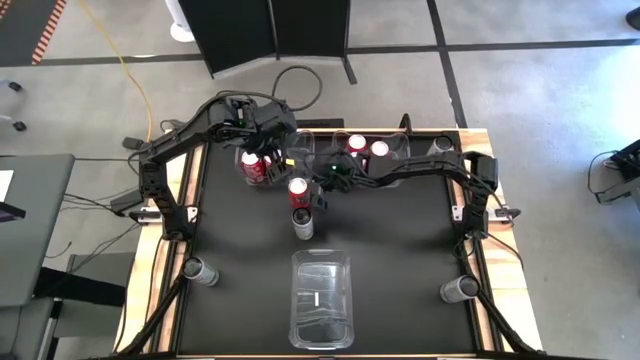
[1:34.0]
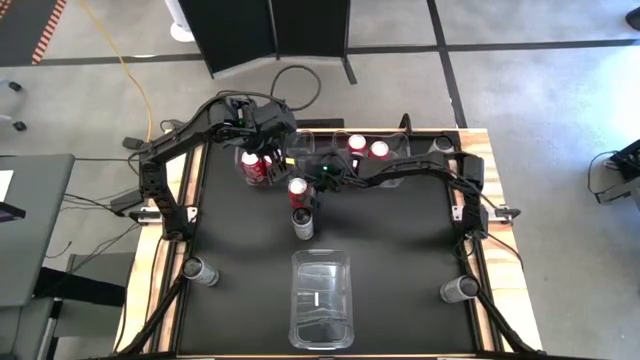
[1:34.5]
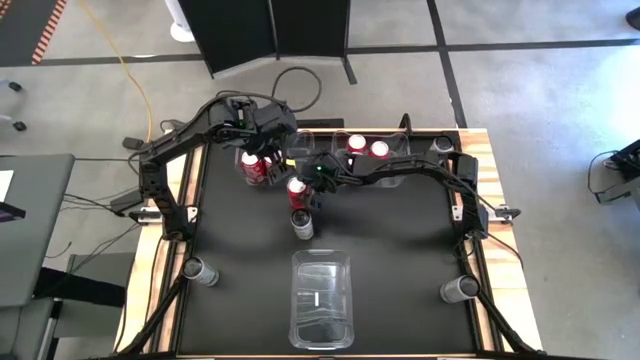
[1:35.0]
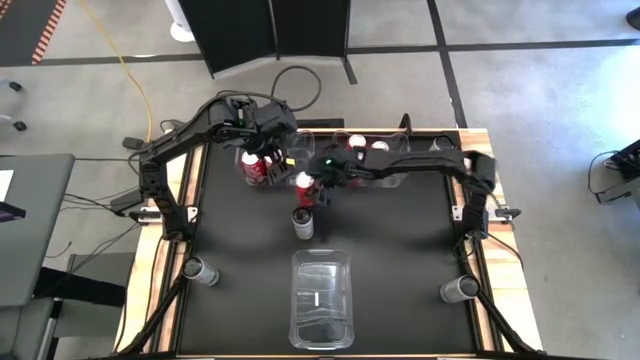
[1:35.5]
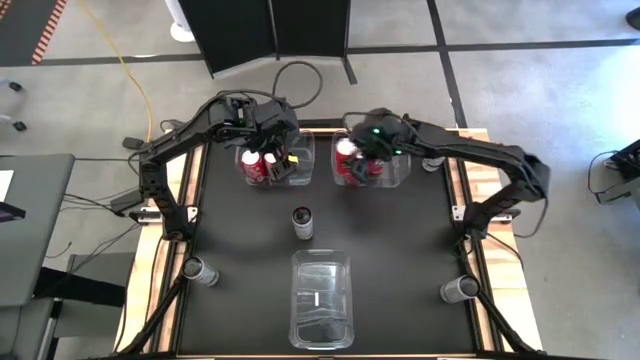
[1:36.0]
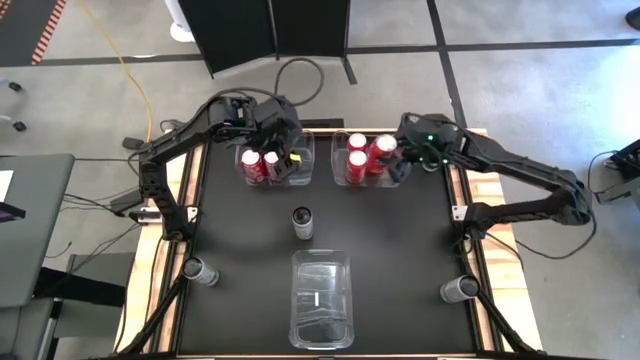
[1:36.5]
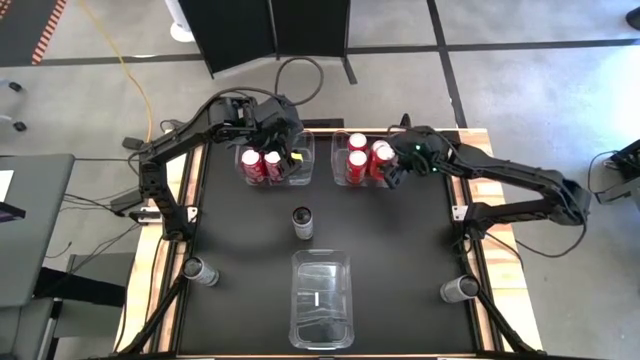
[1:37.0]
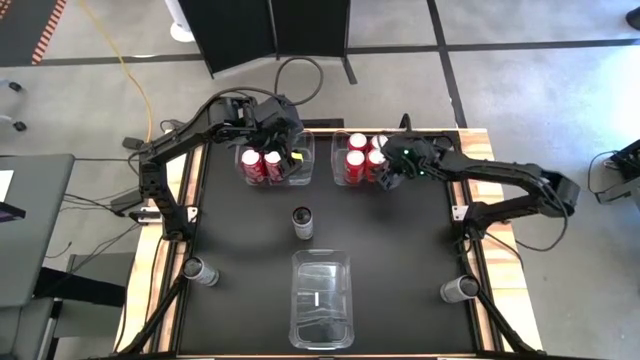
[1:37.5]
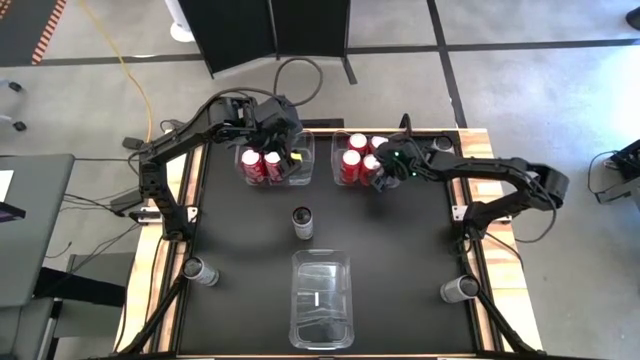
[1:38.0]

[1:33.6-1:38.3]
Task: Sort soda cans
Put the orange soda can into the right transparent bin

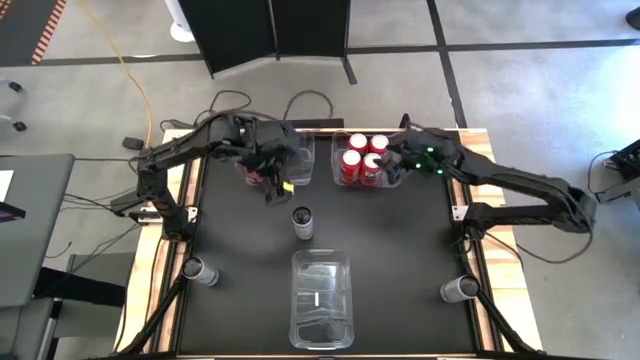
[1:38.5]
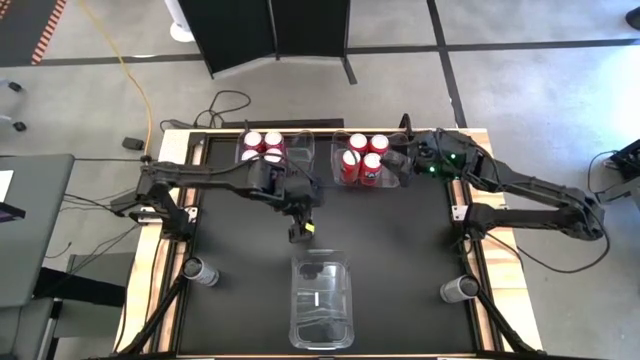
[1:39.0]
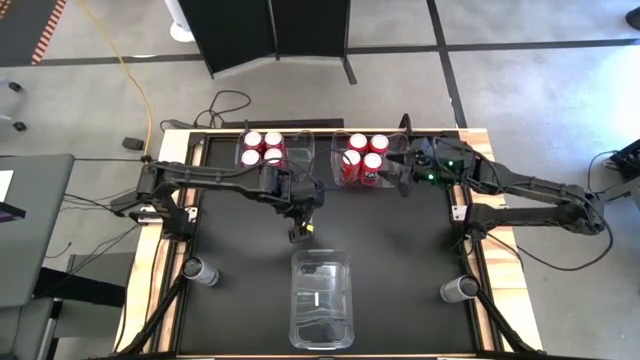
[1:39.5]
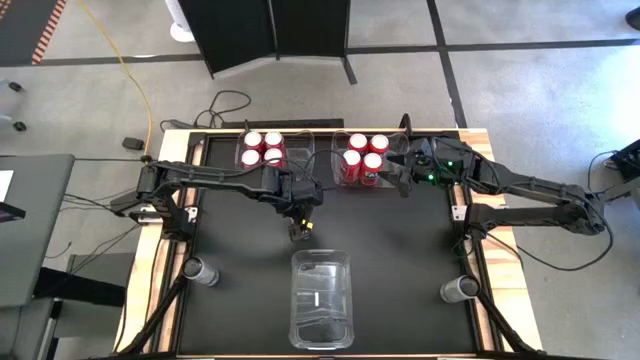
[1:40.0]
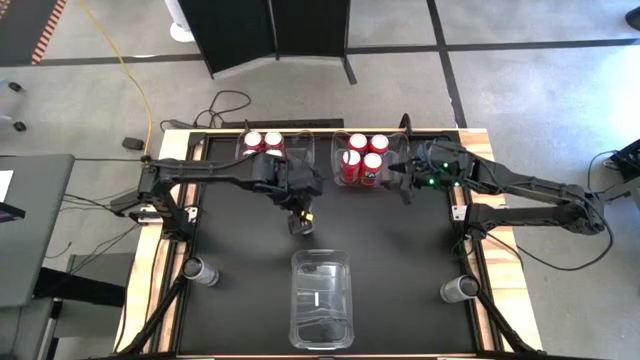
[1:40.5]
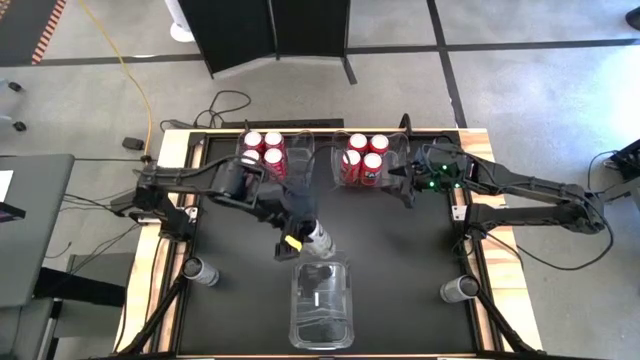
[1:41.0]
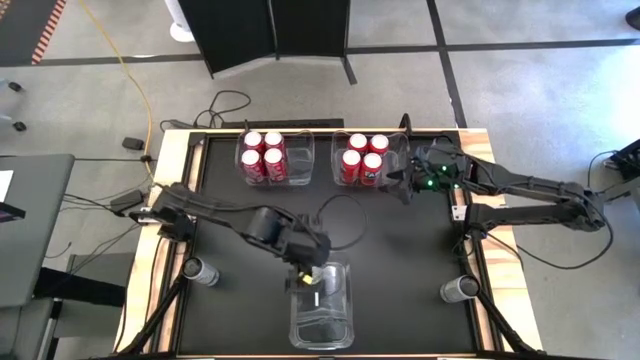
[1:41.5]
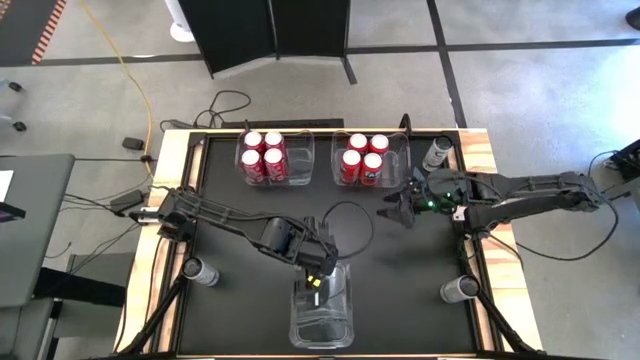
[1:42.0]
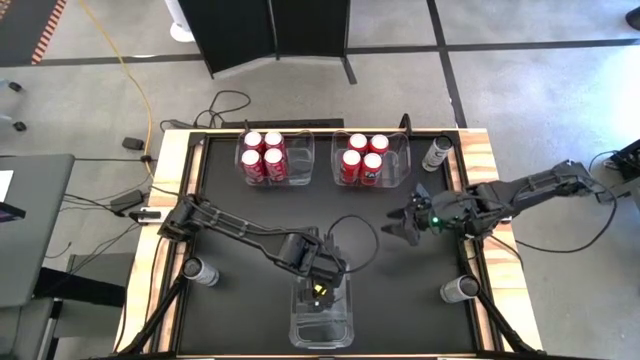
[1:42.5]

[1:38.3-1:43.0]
Put the white yellow soda can into the bottom transparent bin

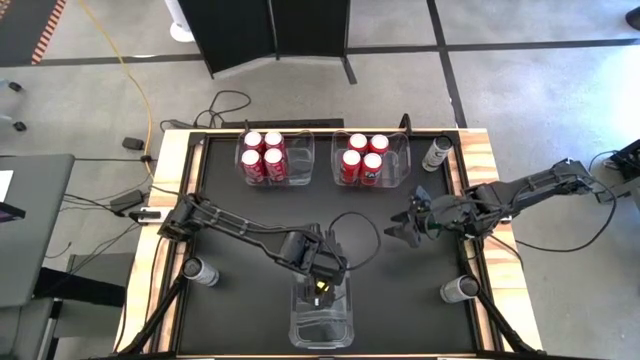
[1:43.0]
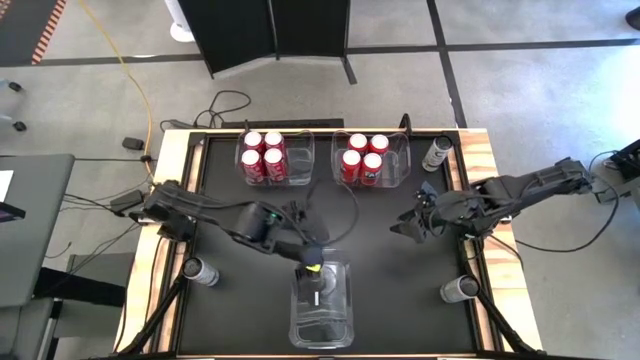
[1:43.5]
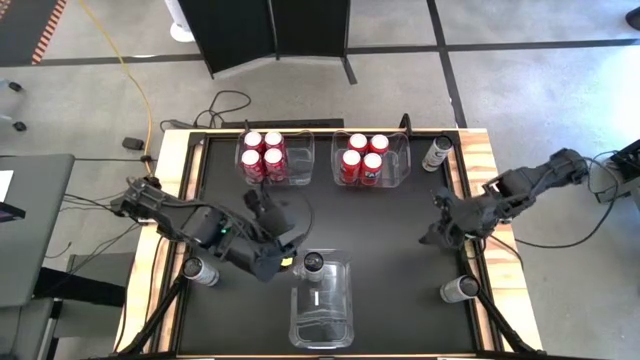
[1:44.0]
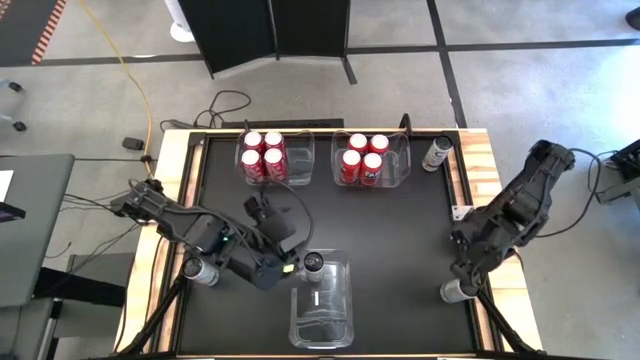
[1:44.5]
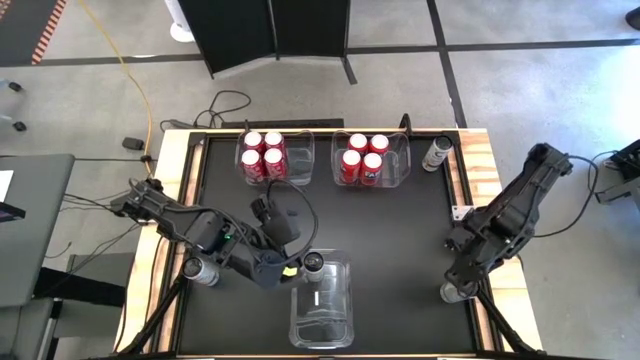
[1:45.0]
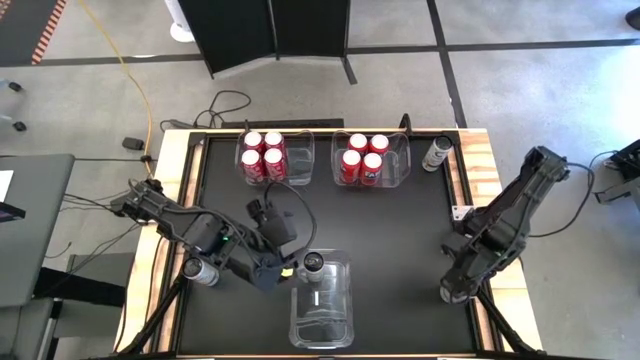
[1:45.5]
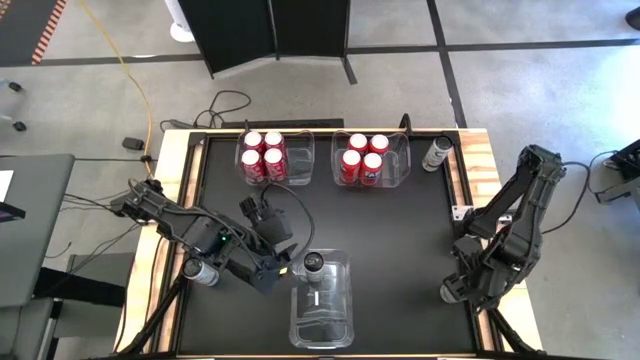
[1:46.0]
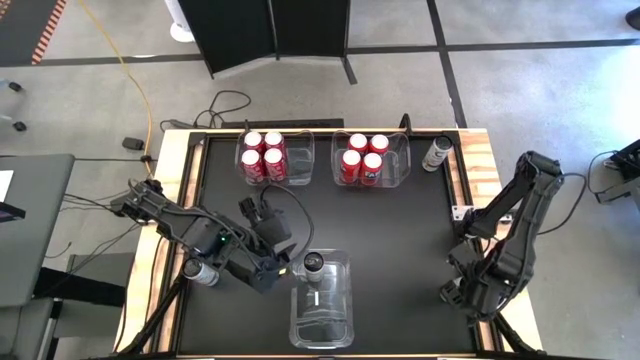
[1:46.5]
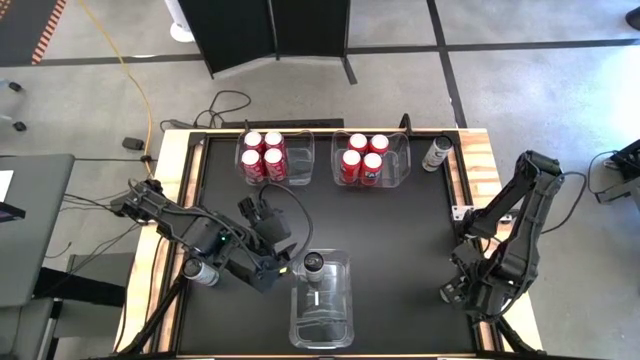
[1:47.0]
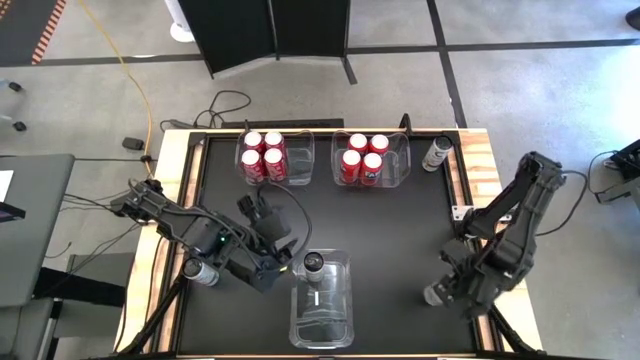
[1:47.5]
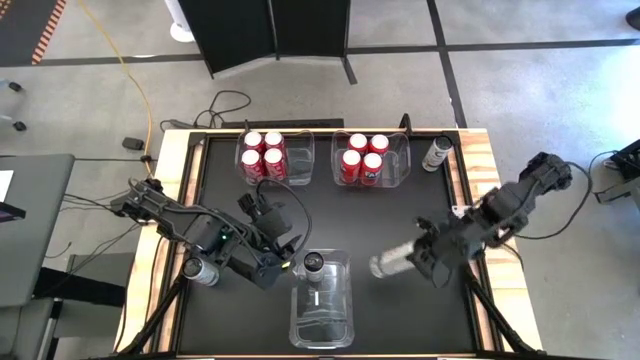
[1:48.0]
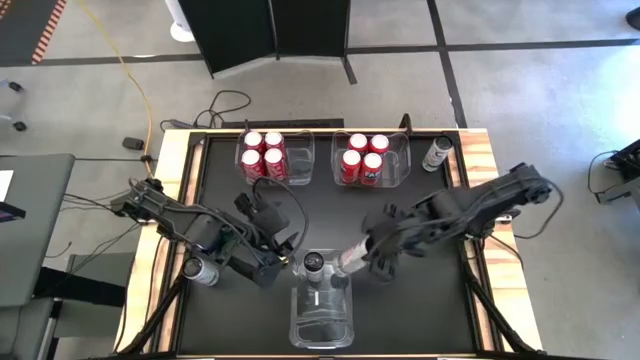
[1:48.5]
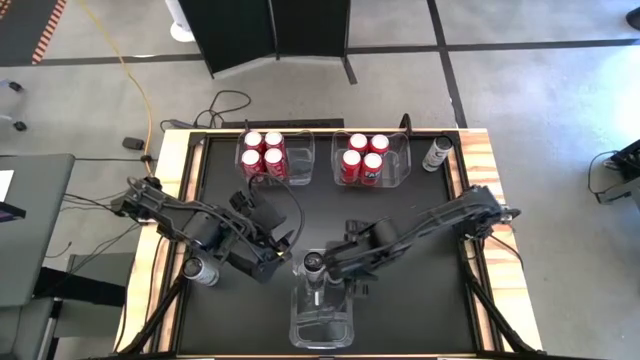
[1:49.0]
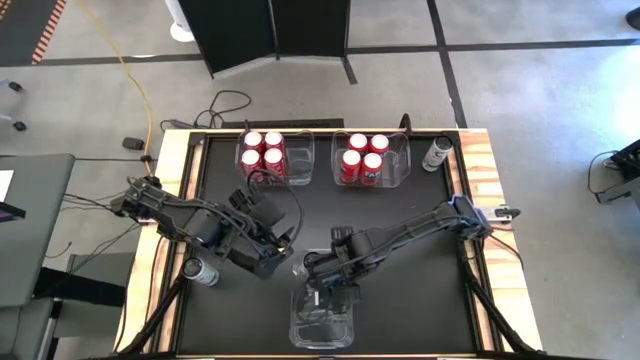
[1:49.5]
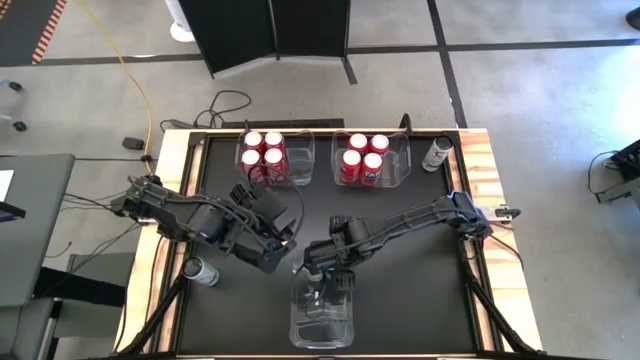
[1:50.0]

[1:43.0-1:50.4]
Put the white yellow soda can into the bottom transparent bin

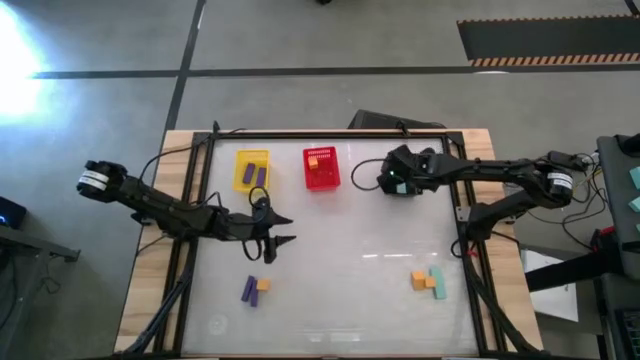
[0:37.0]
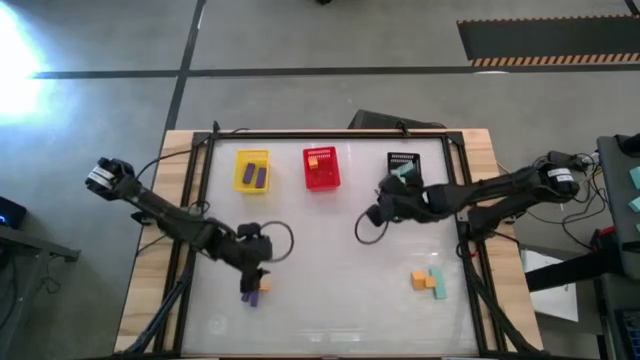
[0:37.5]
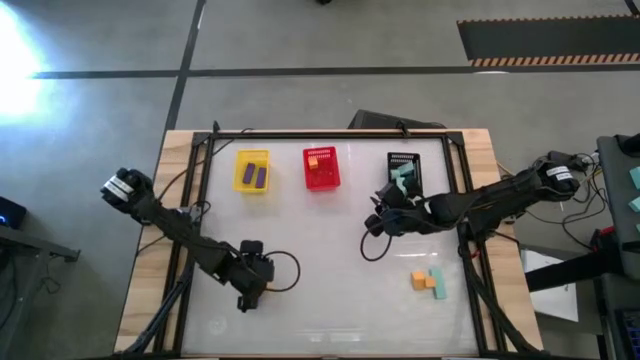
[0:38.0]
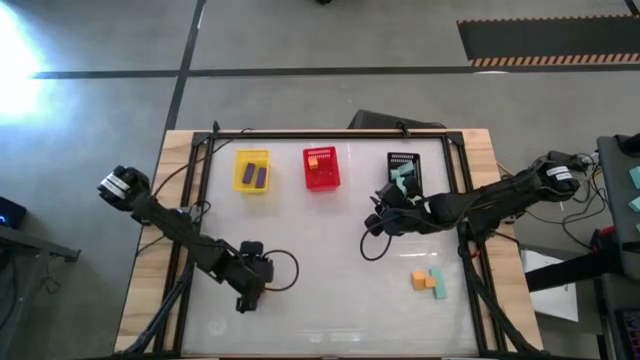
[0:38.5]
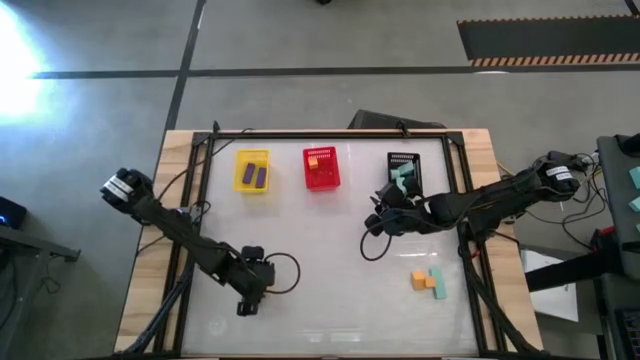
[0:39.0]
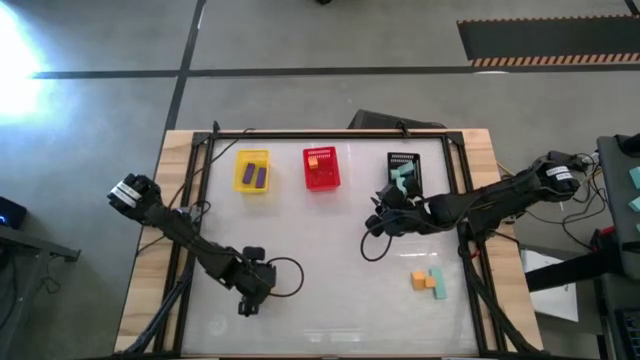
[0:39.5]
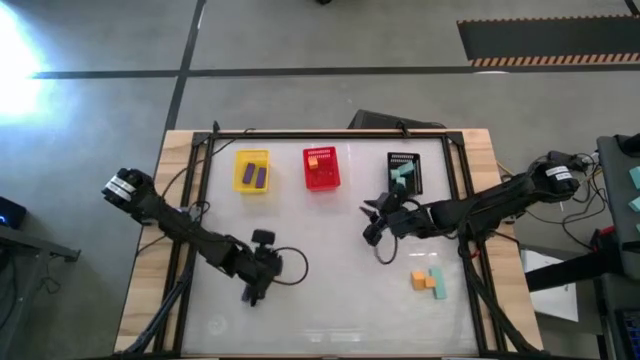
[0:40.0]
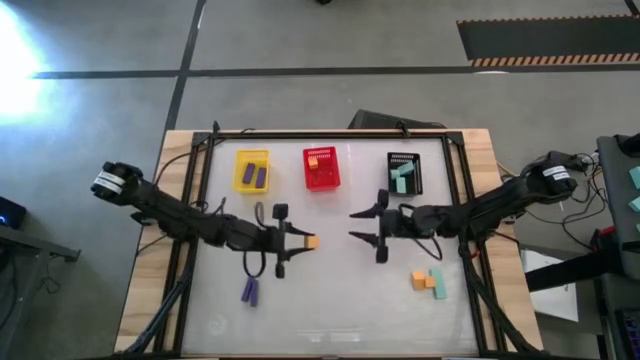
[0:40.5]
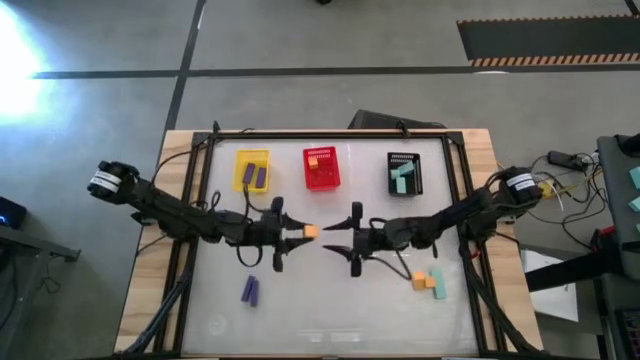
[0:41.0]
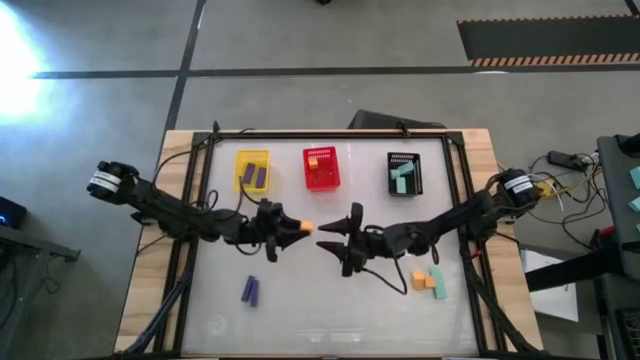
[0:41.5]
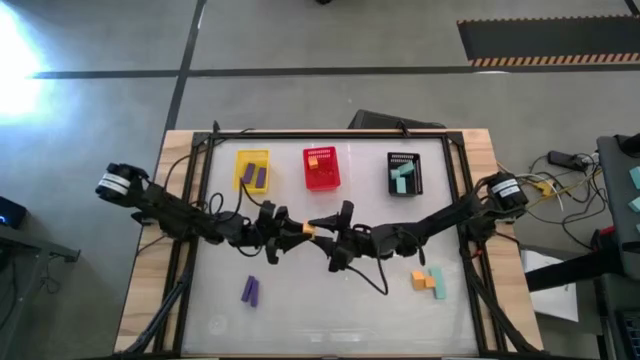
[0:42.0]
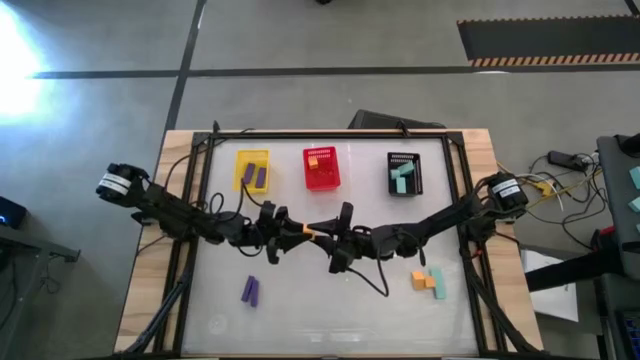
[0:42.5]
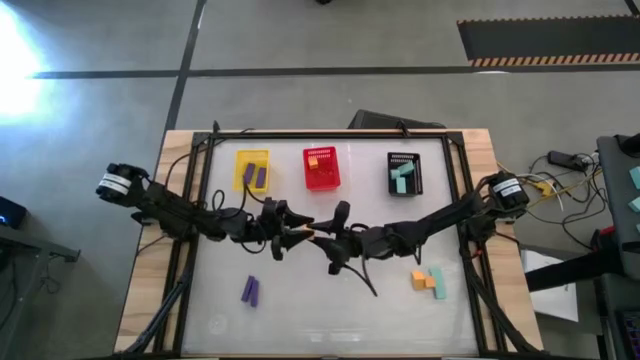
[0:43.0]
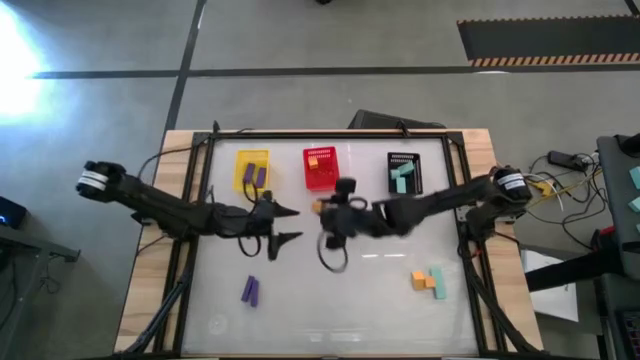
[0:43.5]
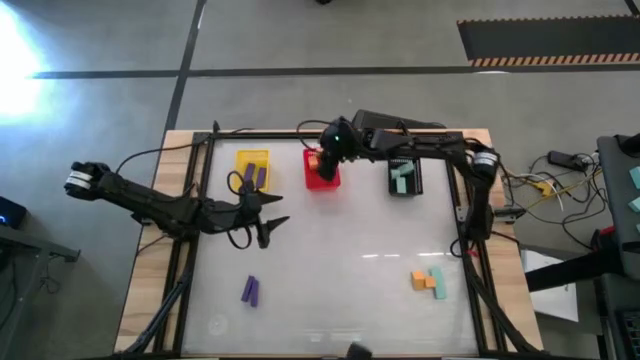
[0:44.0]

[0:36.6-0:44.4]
Task: Sort & place blocks by color
Put the yellow block into the red bin
